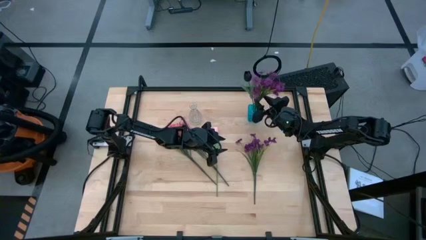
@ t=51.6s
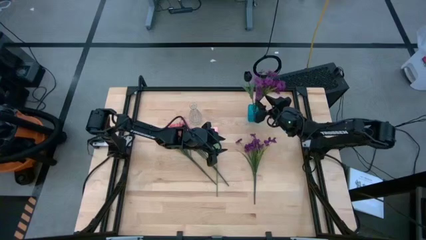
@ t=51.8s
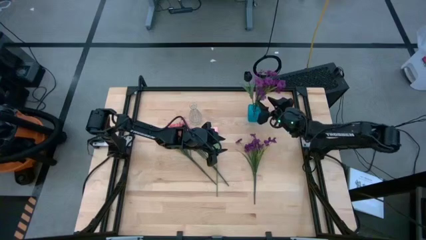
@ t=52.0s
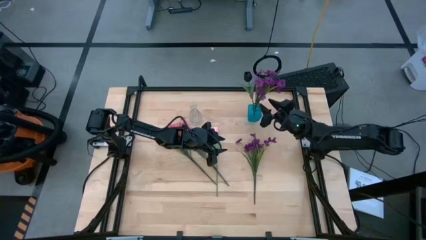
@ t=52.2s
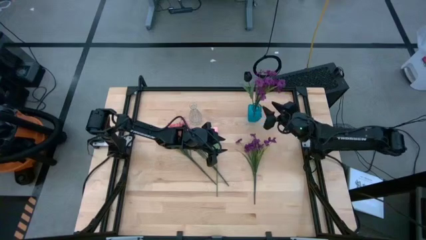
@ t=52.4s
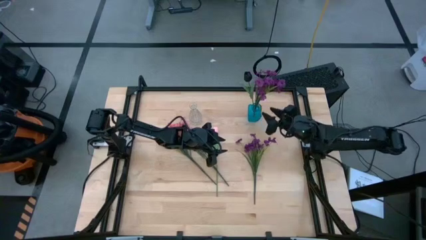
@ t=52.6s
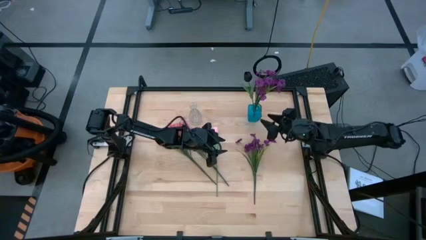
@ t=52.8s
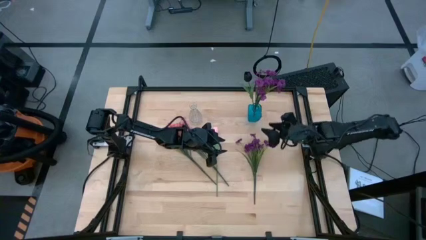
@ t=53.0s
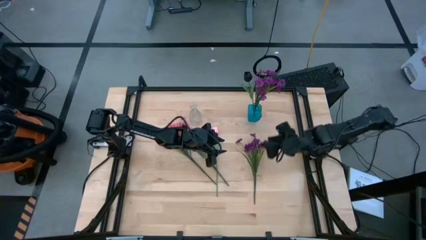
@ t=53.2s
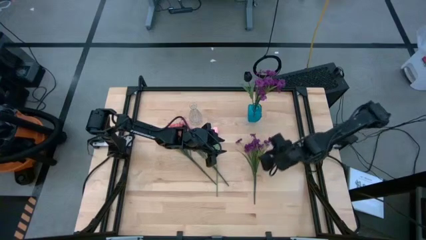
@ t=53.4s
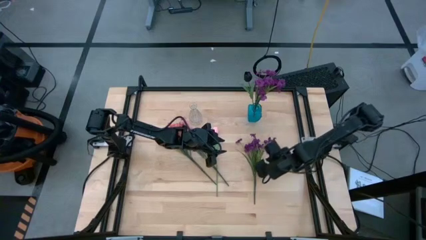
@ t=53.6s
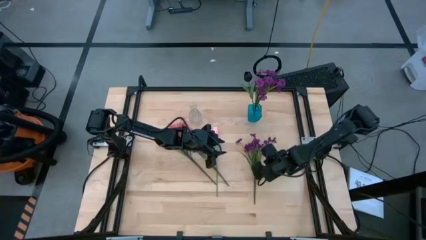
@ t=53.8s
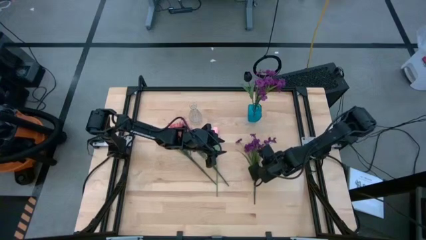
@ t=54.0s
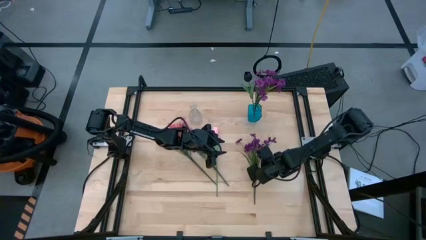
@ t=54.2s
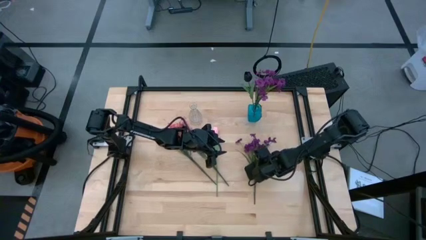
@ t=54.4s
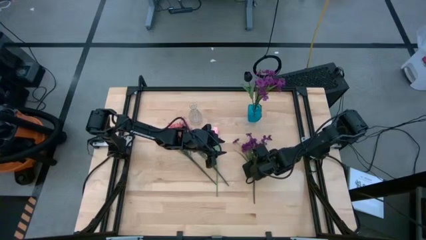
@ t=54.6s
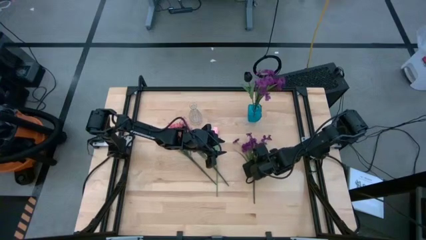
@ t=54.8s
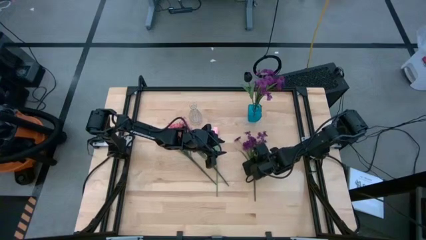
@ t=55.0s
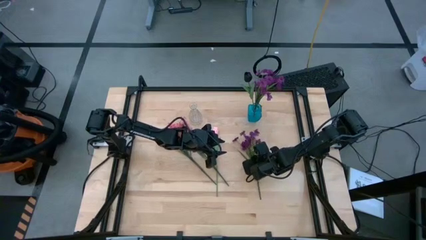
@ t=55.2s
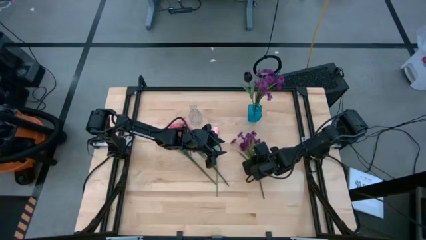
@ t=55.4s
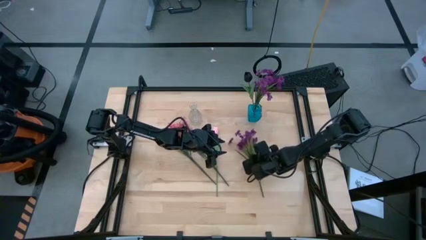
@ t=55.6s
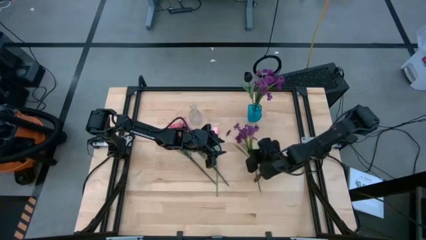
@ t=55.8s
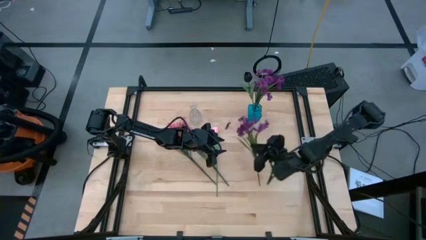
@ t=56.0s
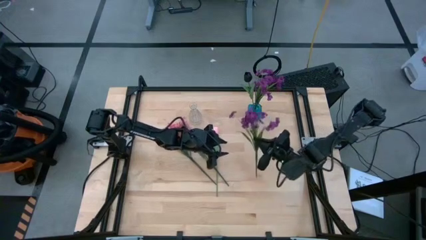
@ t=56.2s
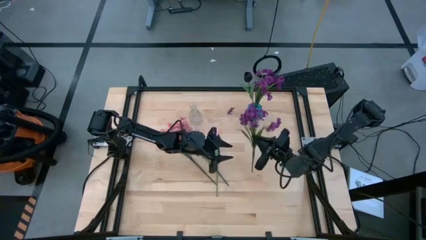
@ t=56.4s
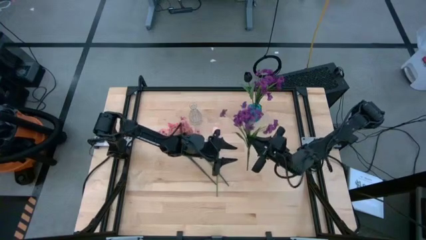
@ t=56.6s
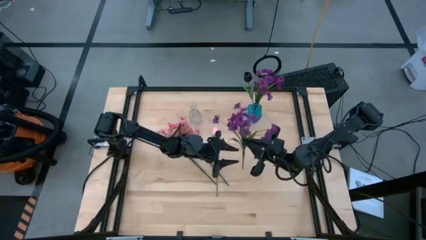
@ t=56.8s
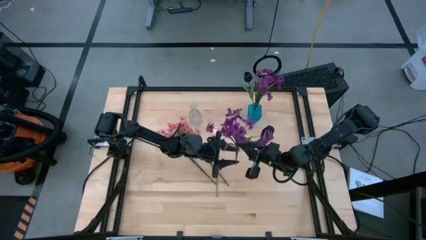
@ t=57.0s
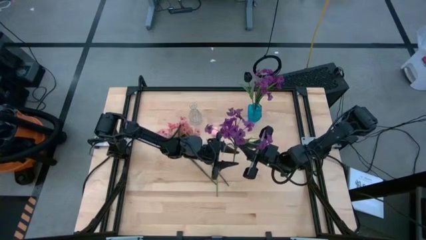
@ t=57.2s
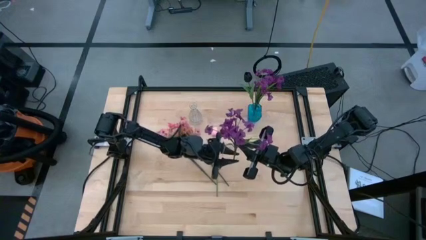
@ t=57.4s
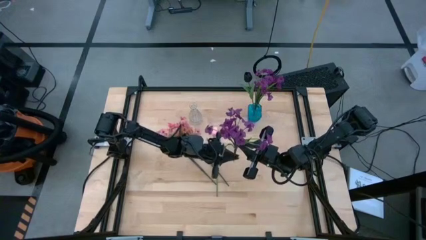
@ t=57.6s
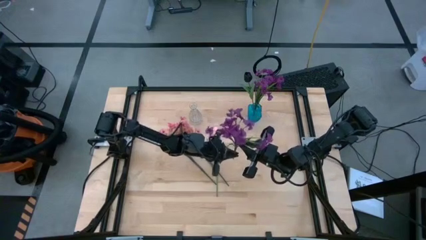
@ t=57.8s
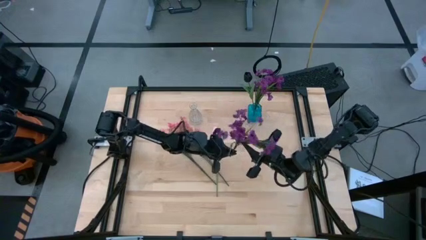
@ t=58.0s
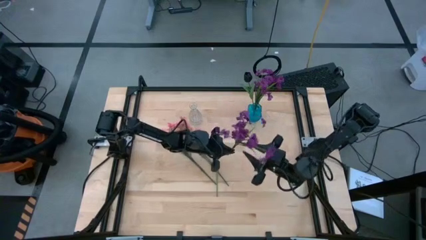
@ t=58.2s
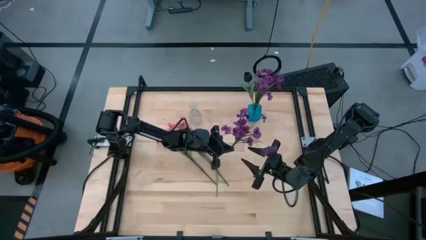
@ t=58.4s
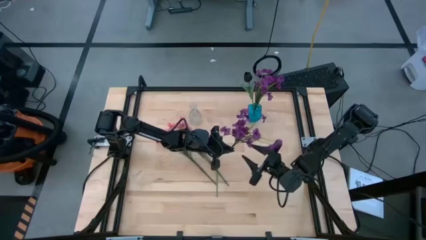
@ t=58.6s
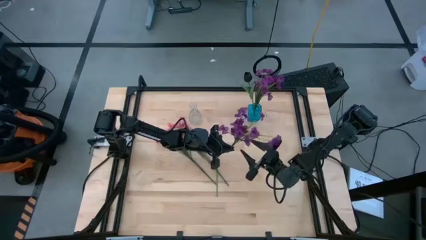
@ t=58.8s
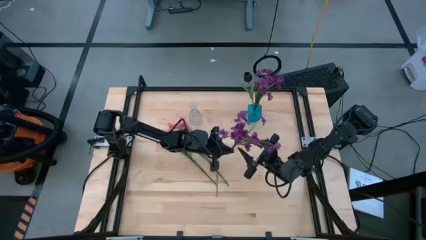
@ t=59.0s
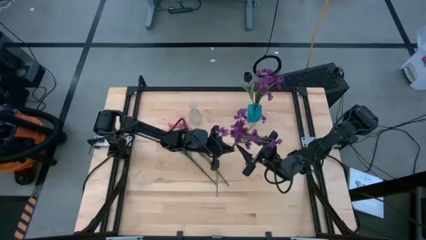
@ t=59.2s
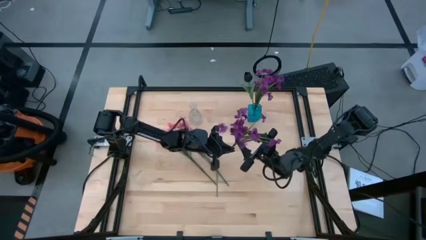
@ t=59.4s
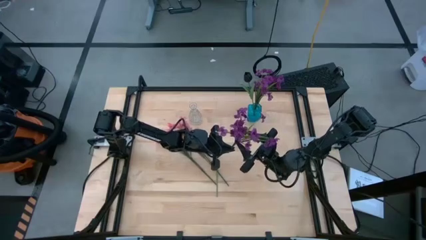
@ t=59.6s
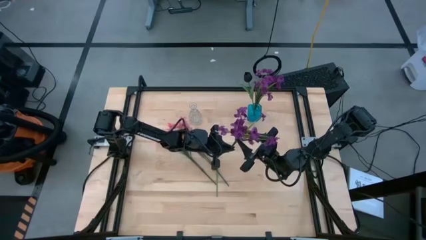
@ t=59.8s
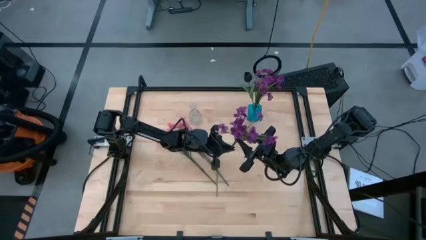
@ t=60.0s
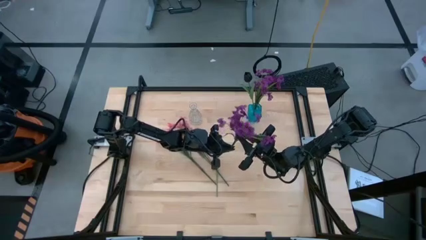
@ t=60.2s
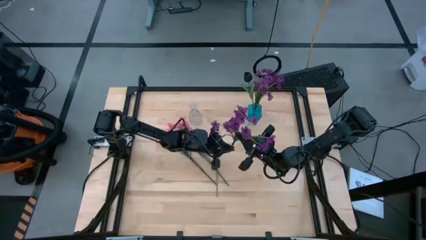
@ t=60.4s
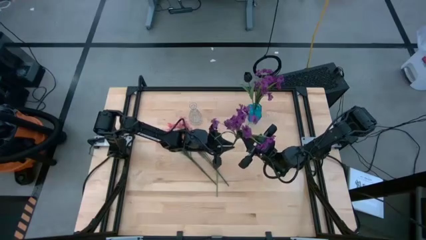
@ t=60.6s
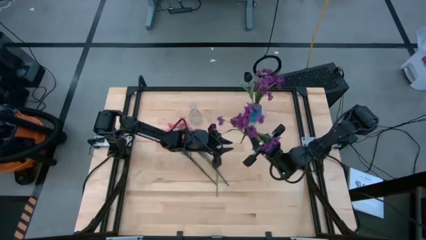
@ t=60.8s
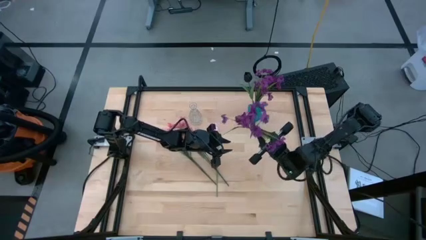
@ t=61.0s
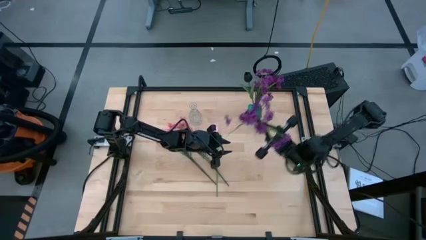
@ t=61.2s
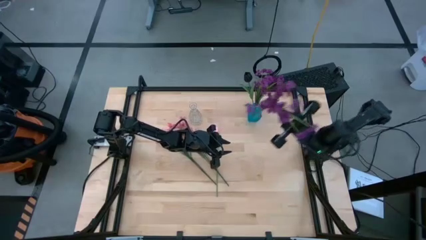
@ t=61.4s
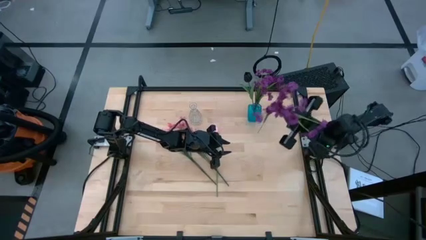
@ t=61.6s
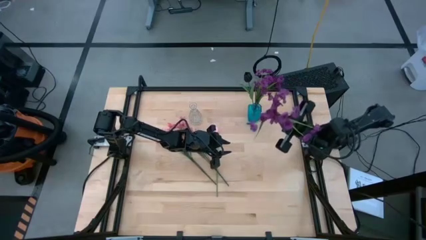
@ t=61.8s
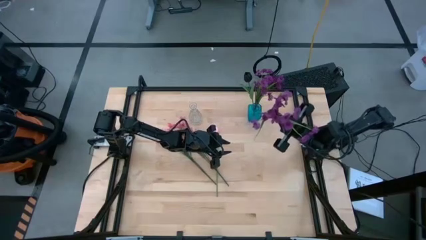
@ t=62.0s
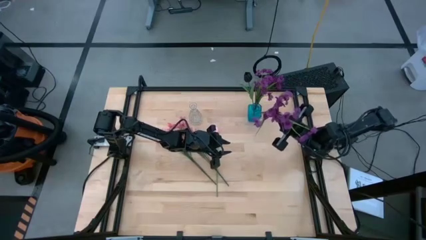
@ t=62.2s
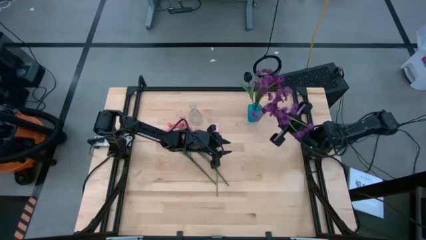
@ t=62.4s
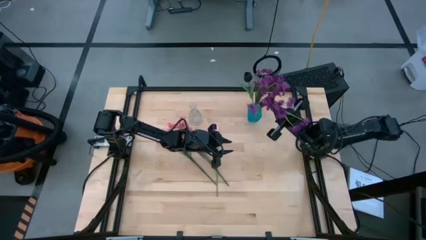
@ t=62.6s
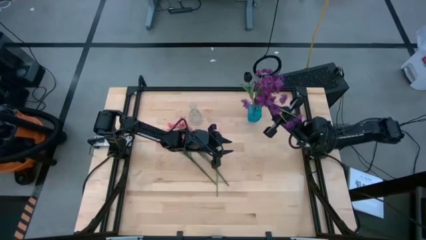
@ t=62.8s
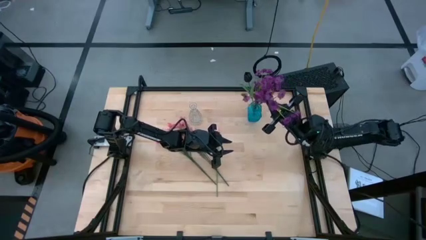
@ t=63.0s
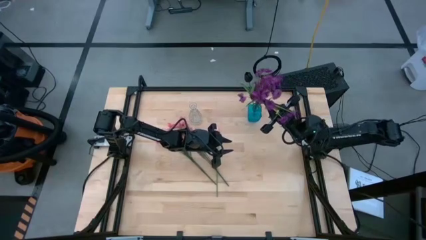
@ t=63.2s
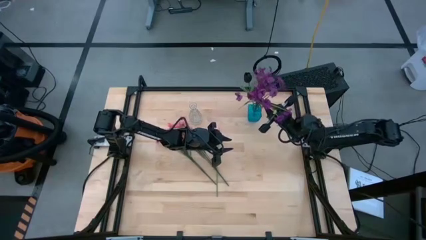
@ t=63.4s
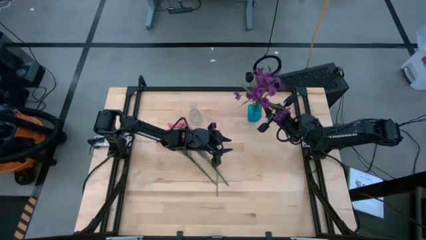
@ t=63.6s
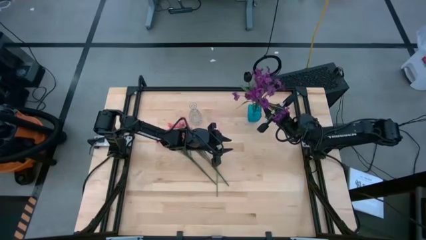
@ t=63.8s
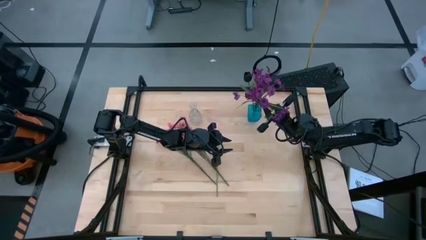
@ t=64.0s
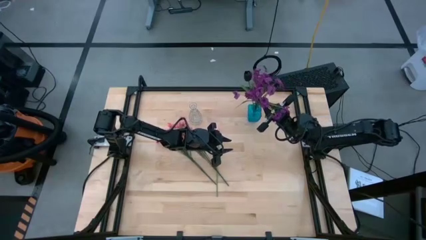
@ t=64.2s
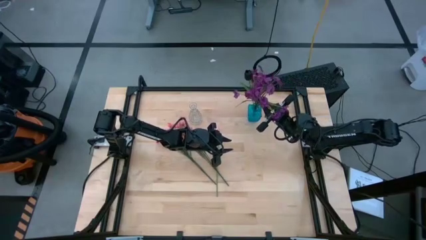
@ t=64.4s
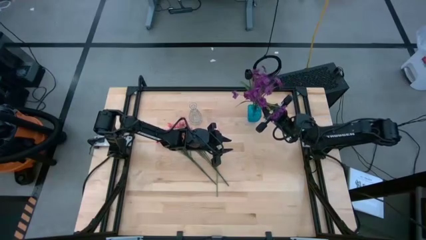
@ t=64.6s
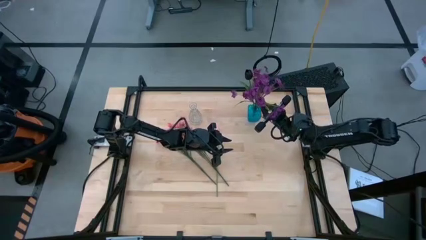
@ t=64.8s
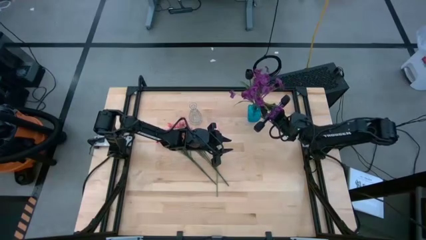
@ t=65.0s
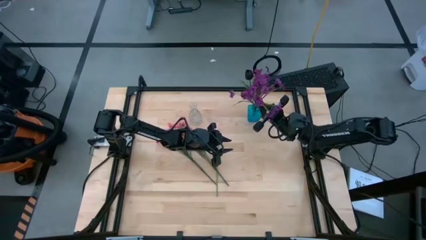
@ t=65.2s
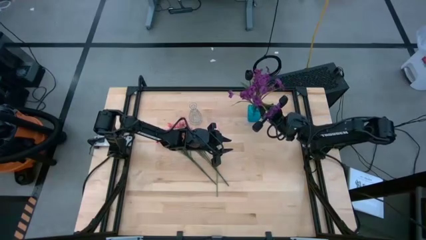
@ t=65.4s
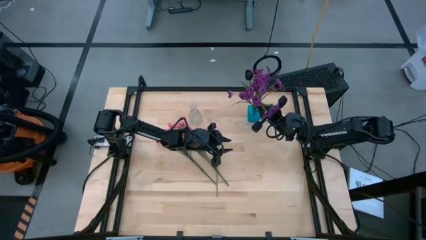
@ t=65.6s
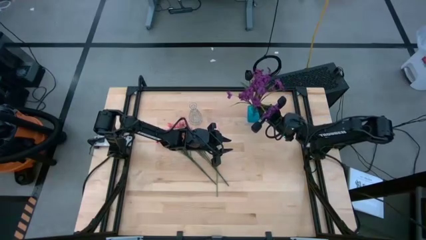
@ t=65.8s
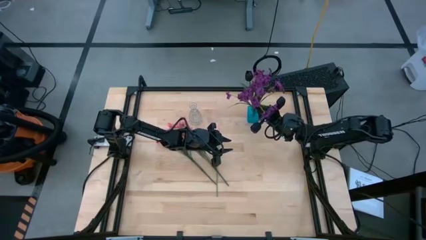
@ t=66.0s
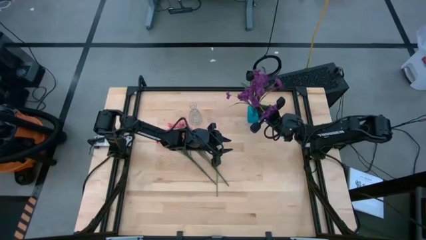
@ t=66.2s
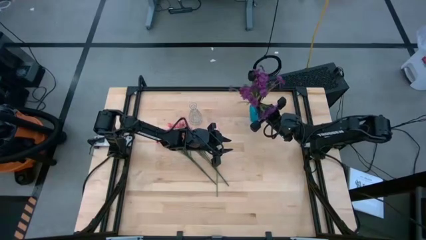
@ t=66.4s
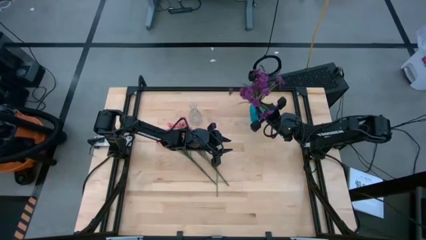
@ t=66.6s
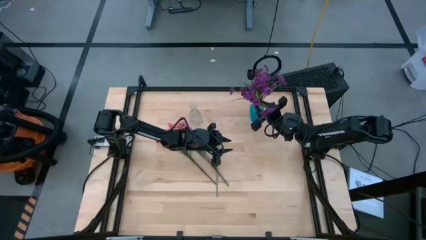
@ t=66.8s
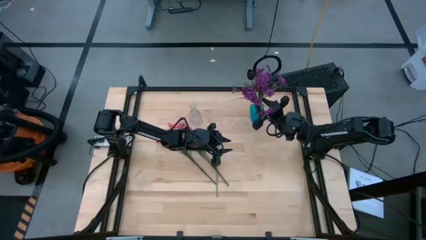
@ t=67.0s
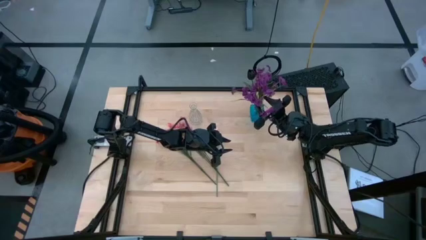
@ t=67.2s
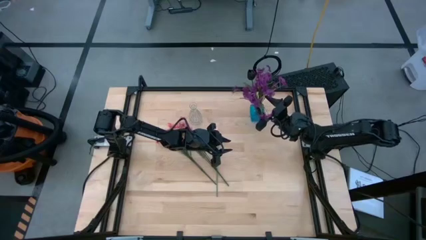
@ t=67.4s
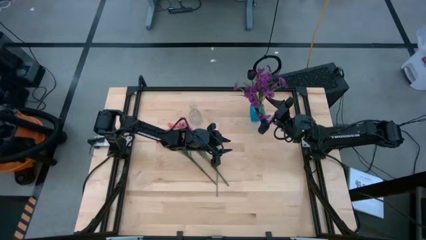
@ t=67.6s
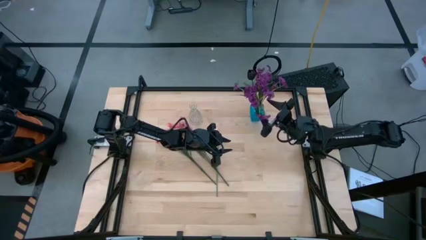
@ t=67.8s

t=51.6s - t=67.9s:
Task: Sort flowers into vase by color
Put the purple flower into the blue vase
